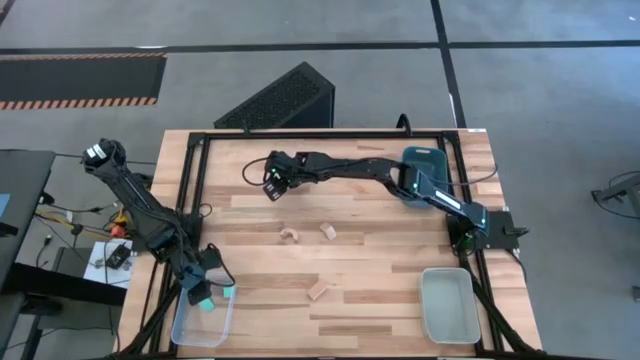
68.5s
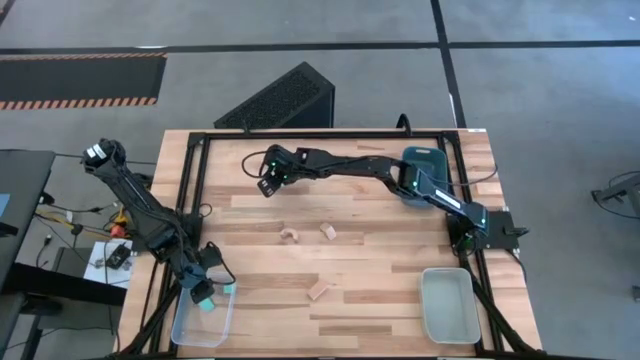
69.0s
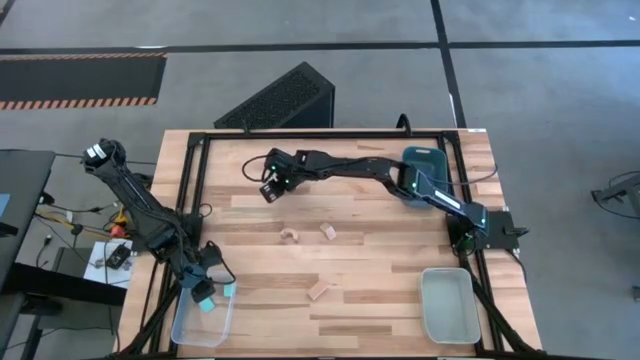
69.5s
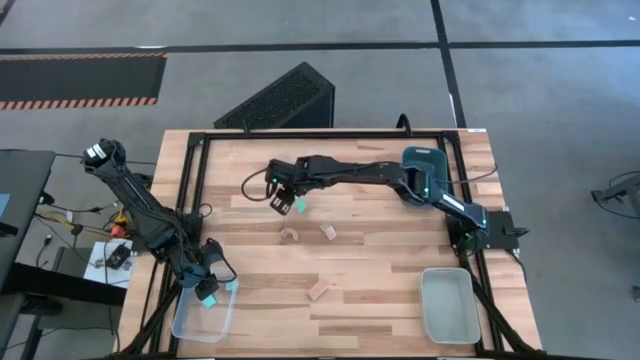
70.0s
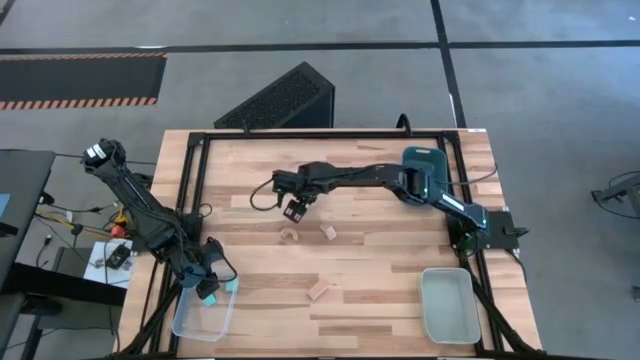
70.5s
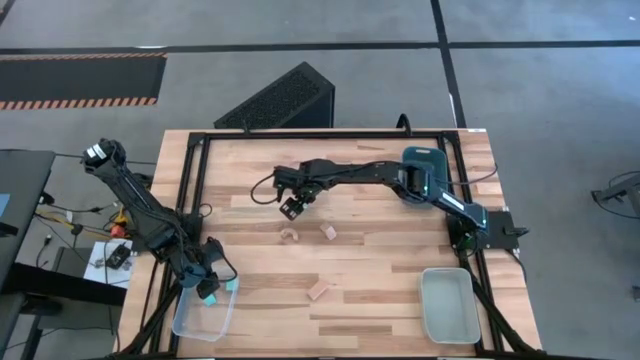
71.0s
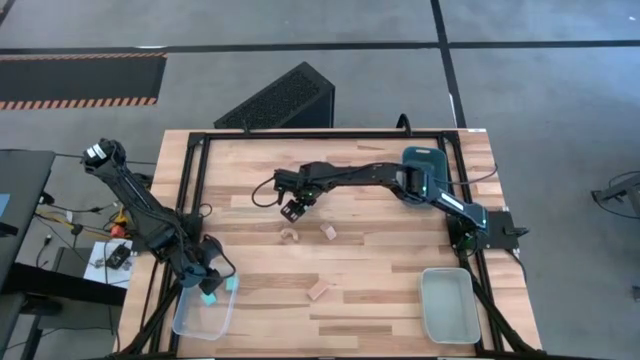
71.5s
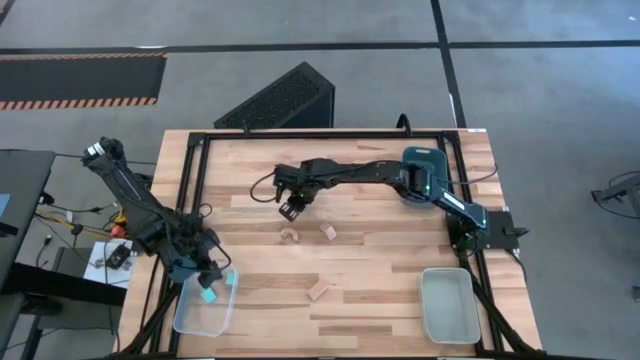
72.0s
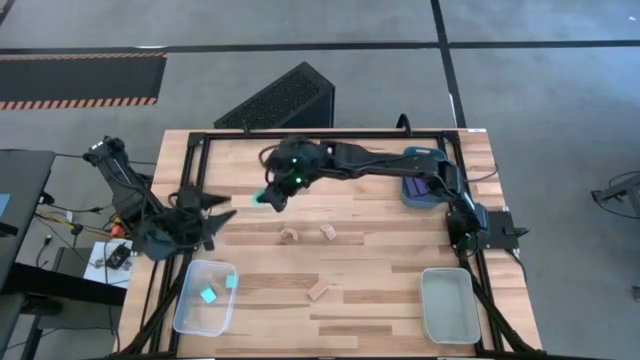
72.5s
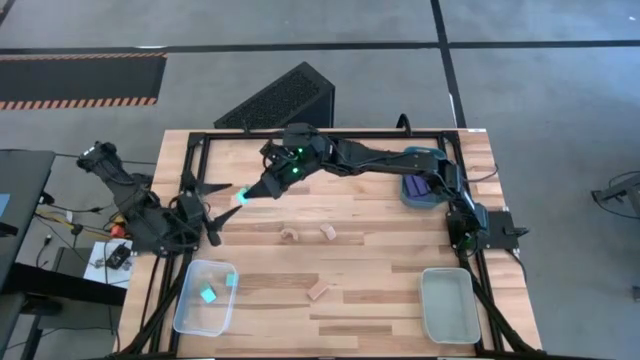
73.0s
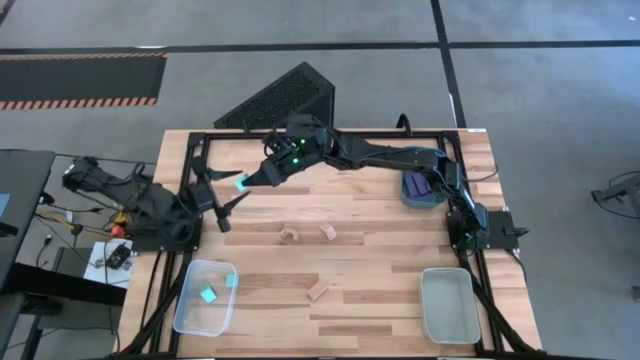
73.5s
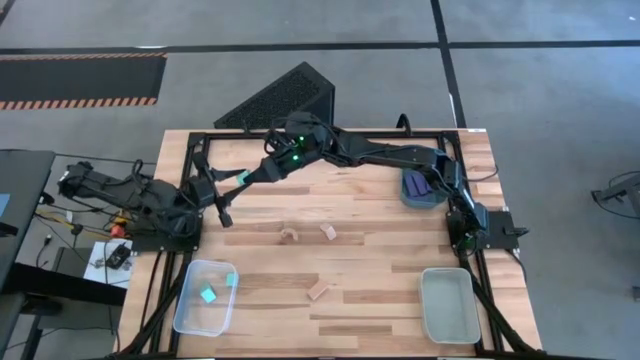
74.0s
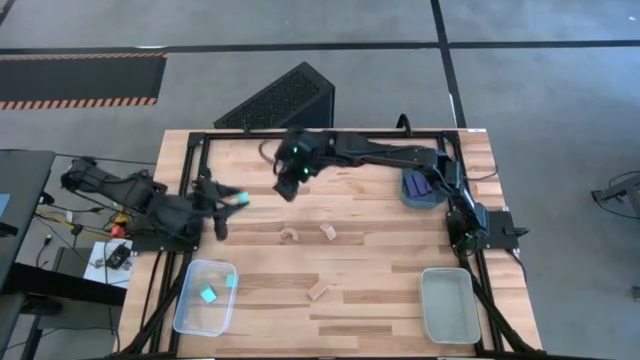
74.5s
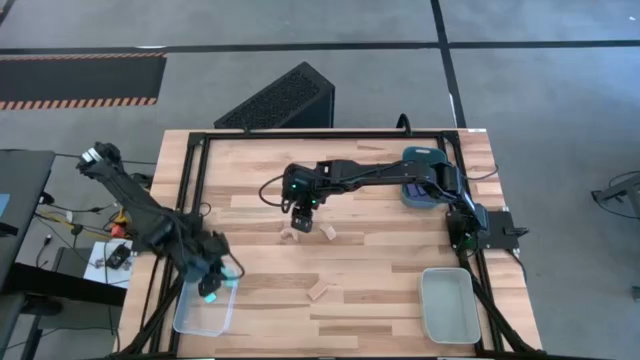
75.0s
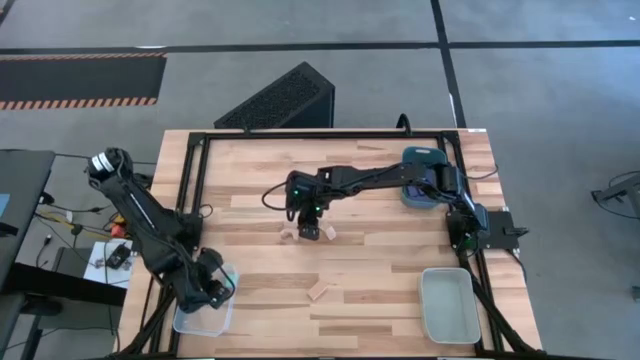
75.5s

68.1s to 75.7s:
Task: Sort & place blocks by color
Put the light blue block into the transparent bin

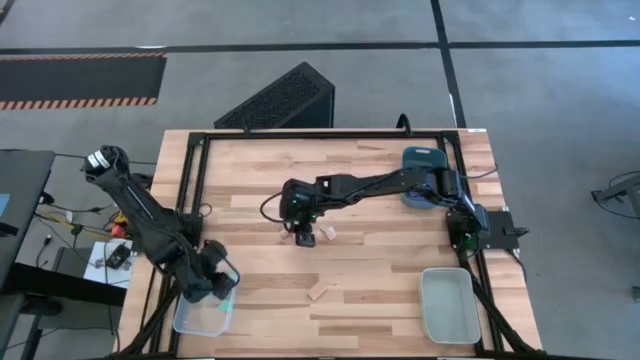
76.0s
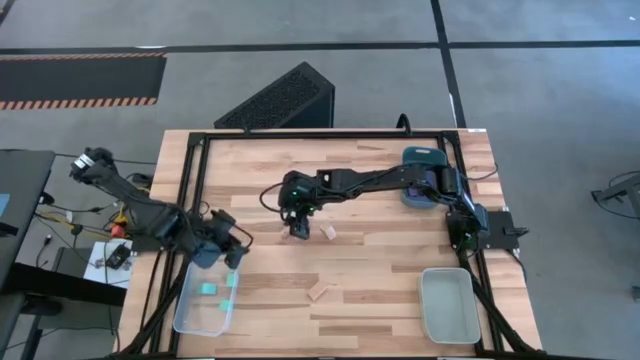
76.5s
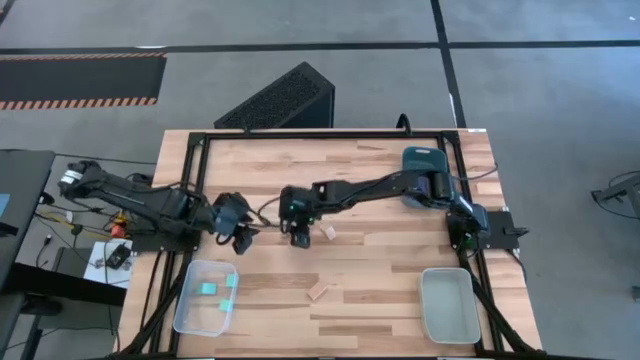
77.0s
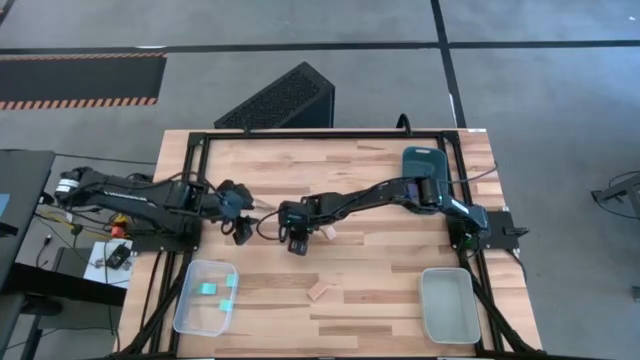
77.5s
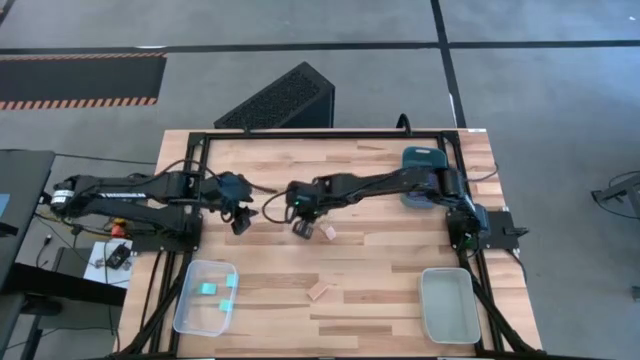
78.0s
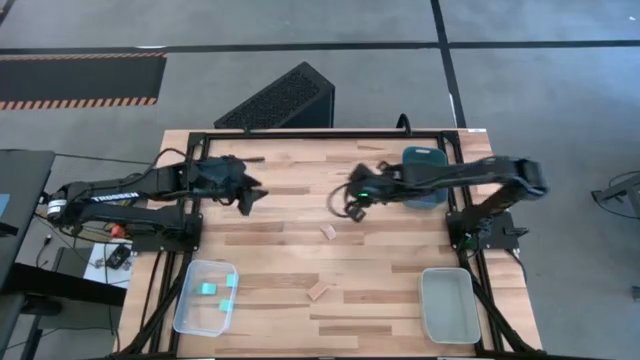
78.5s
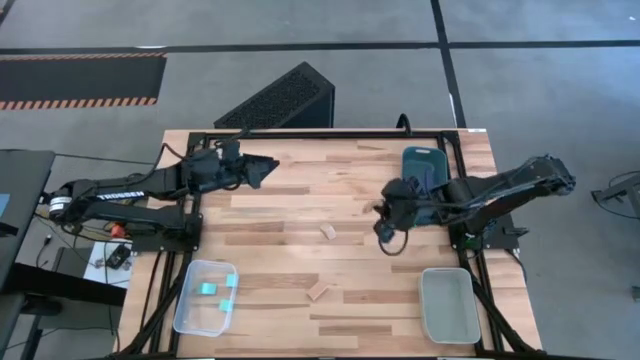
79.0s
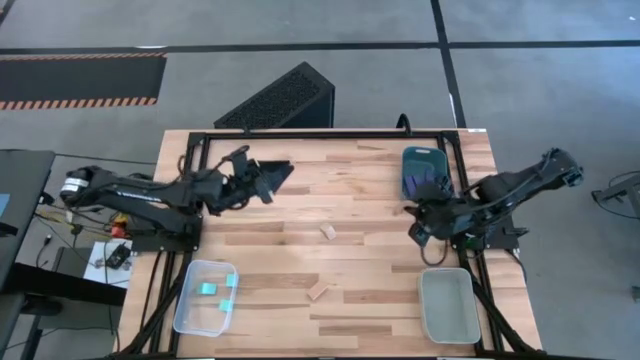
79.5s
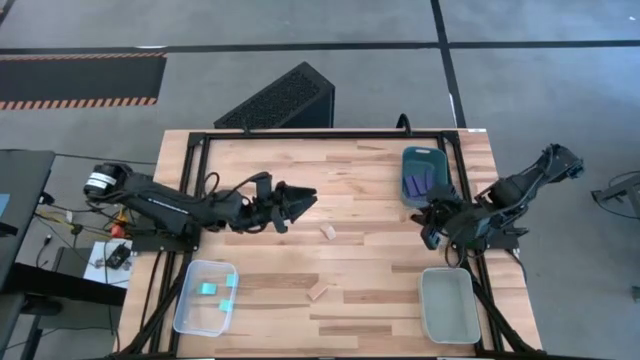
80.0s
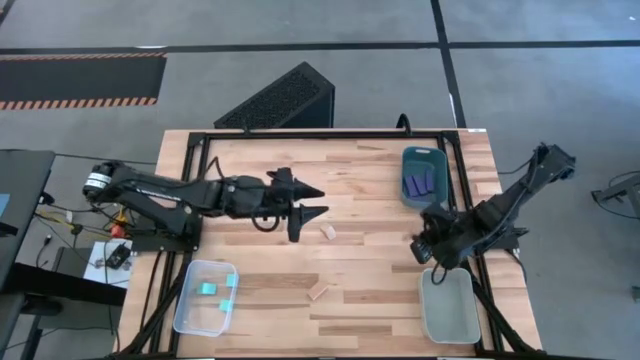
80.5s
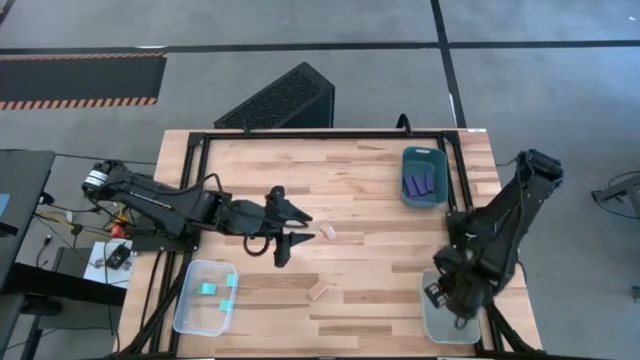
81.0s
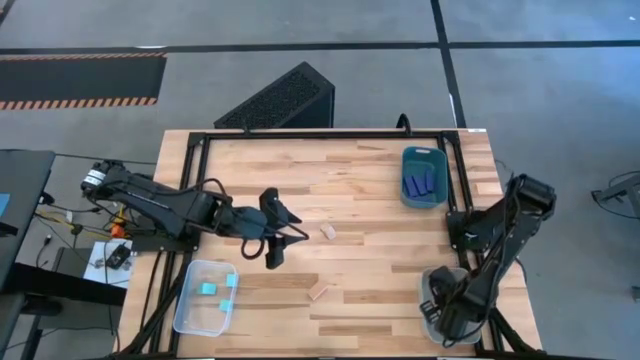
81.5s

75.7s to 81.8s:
Put the light brown block into the gray bin

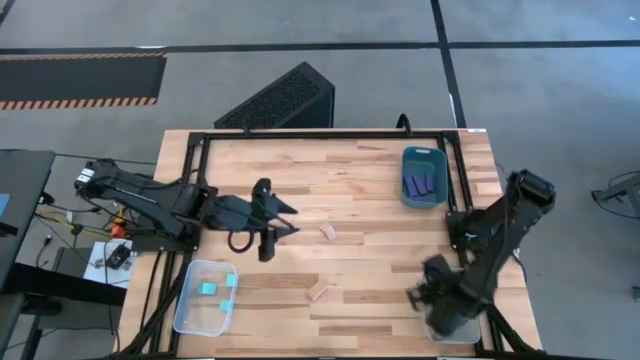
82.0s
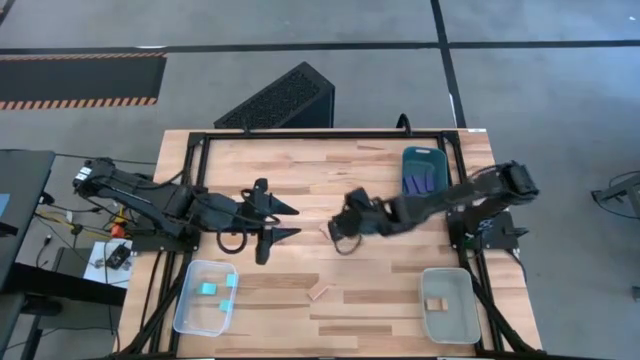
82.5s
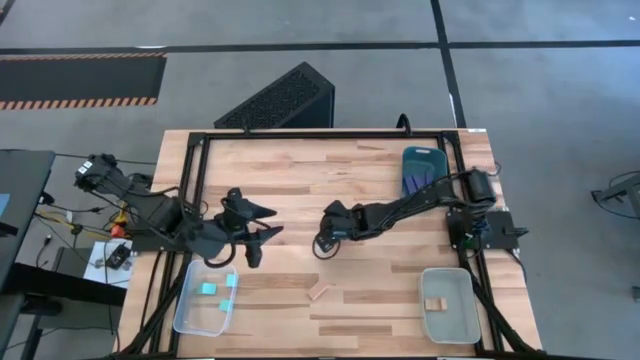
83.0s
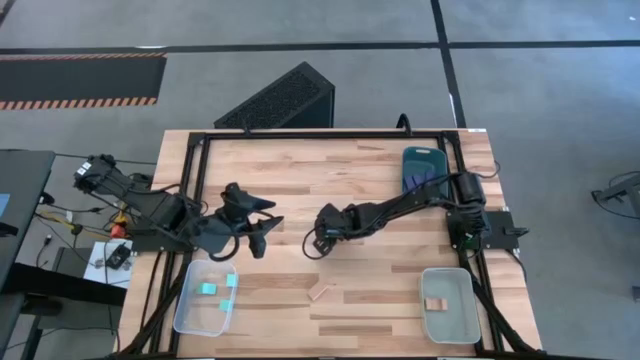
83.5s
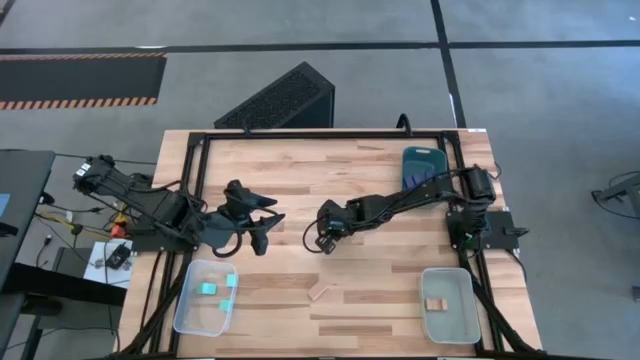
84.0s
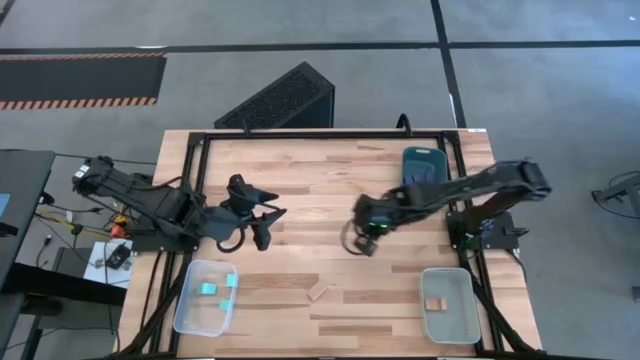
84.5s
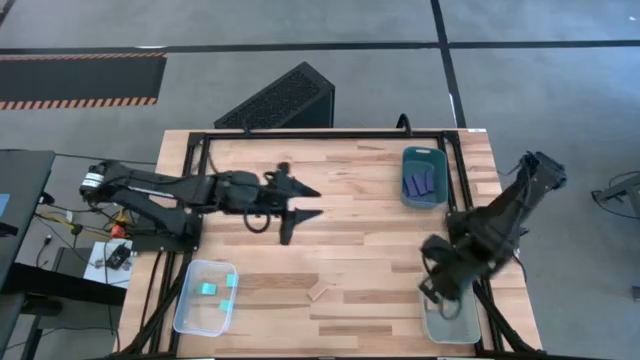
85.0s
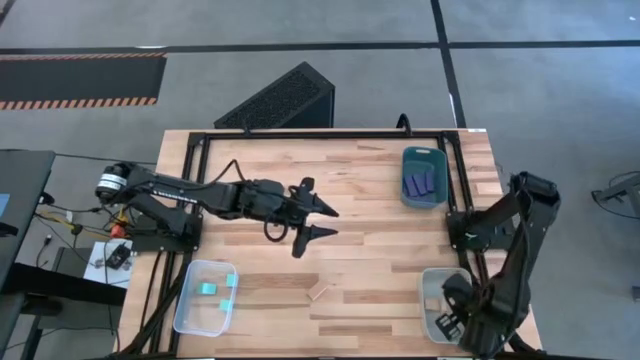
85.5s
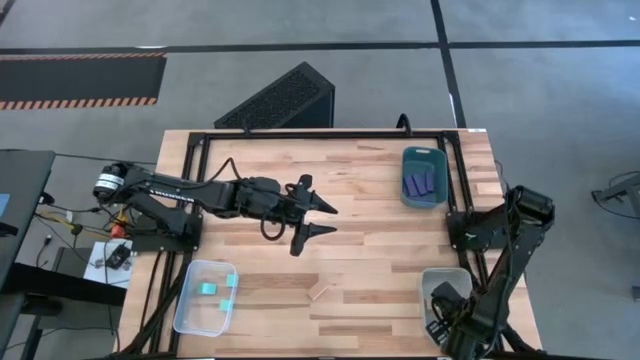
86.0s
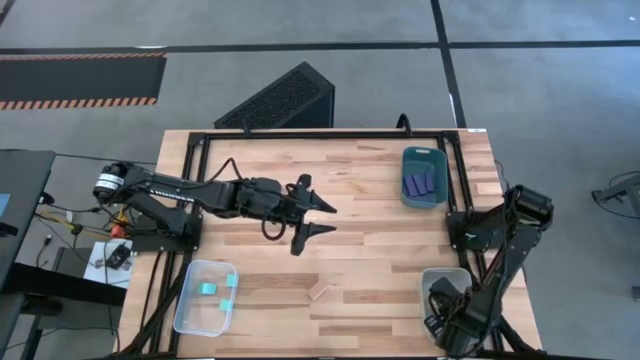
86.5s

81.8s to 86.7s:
Put the light brown block into the gray bin

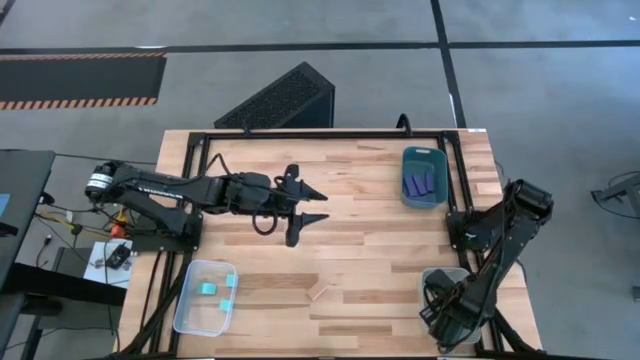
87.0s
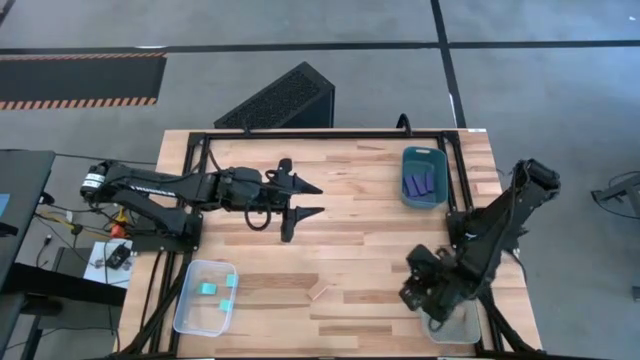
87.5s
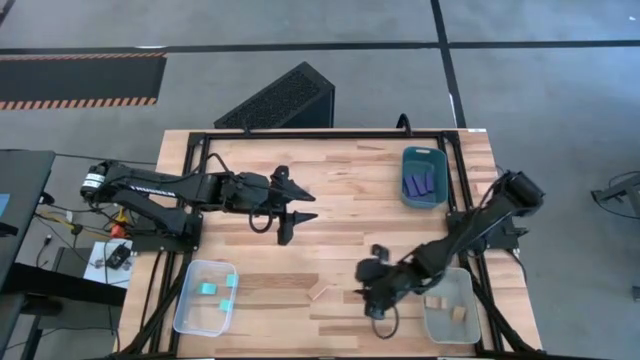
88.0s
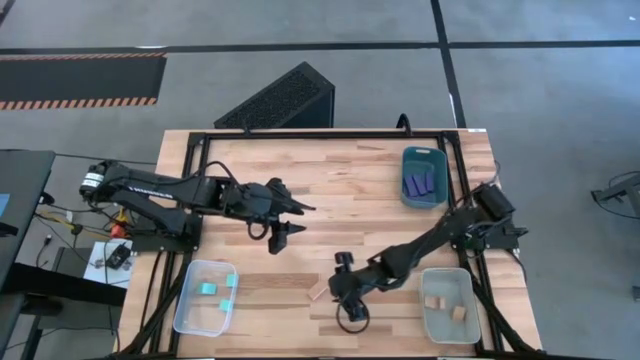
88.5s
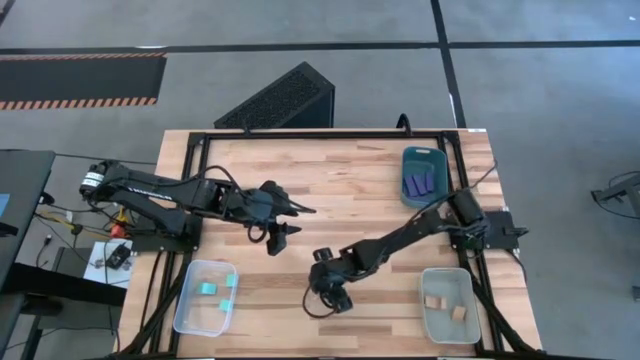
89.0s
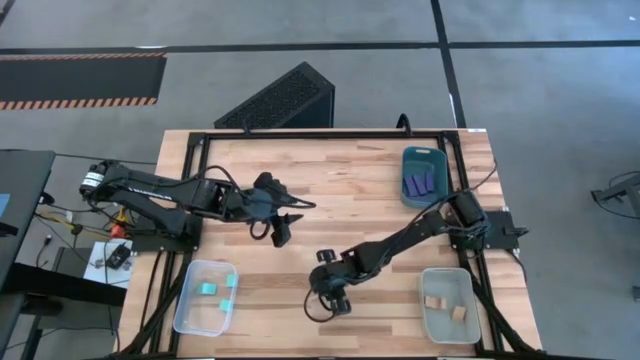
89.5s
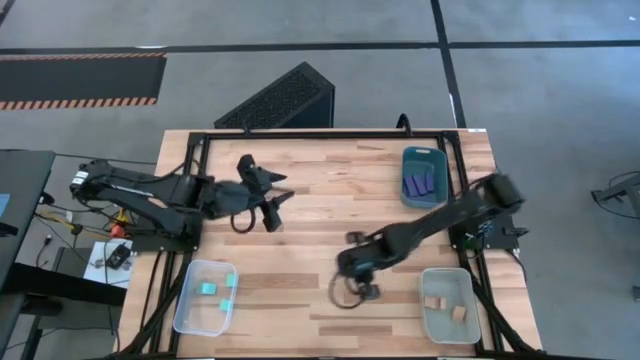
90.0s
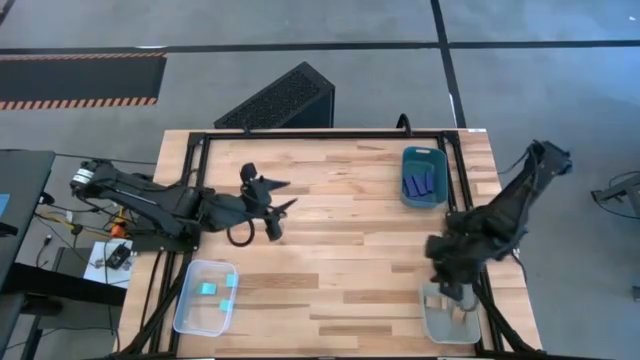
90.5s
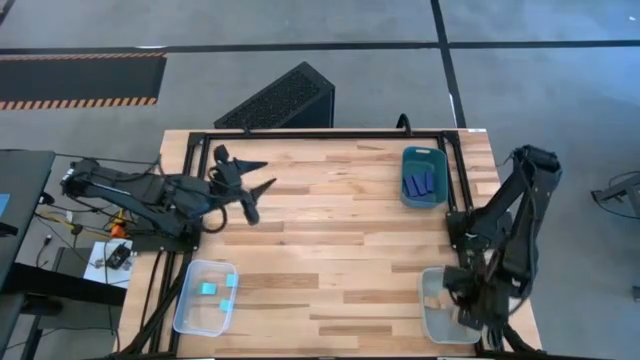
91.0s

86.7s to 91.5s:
Put the light brown block into the gray bin
